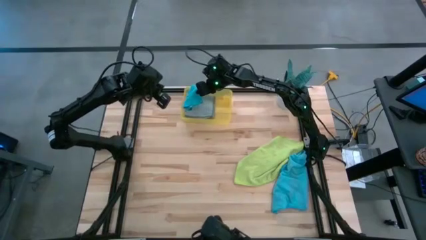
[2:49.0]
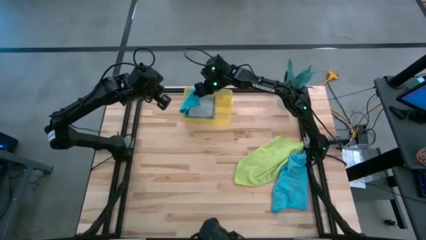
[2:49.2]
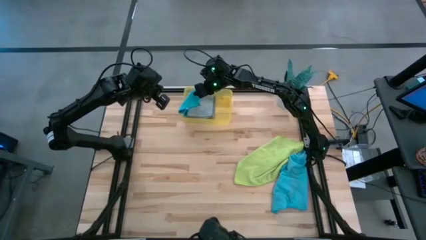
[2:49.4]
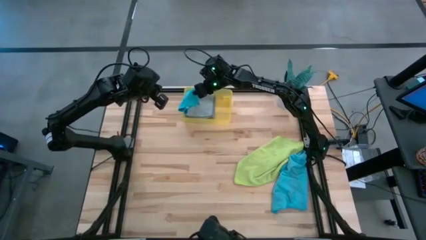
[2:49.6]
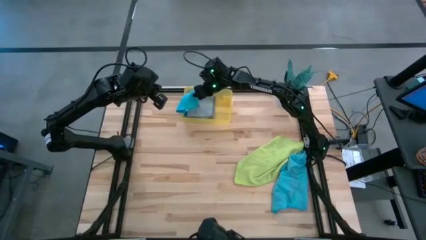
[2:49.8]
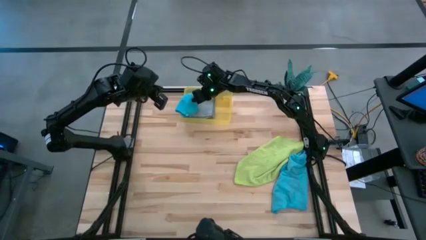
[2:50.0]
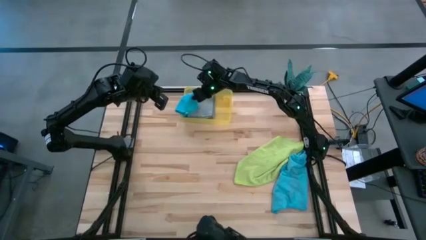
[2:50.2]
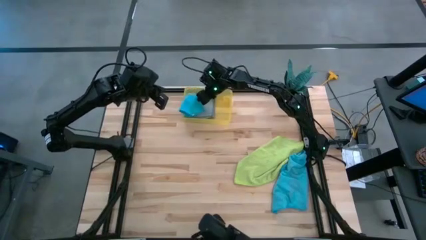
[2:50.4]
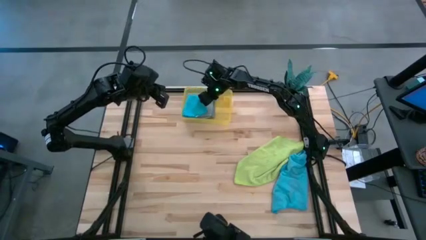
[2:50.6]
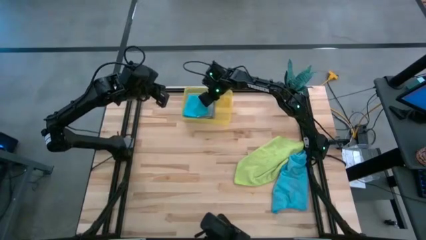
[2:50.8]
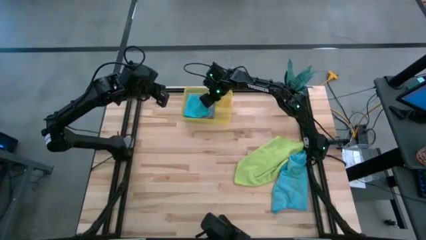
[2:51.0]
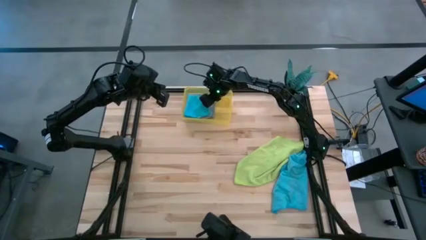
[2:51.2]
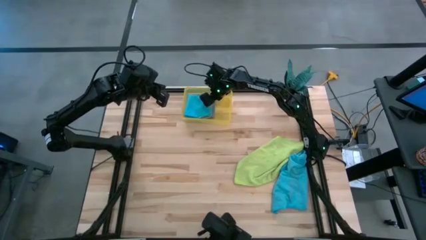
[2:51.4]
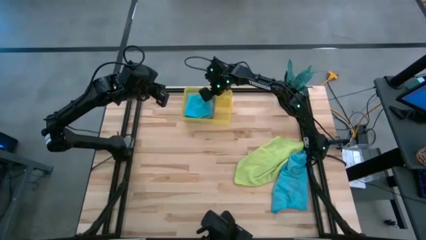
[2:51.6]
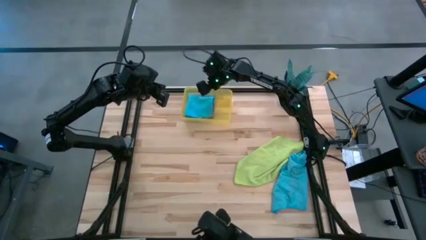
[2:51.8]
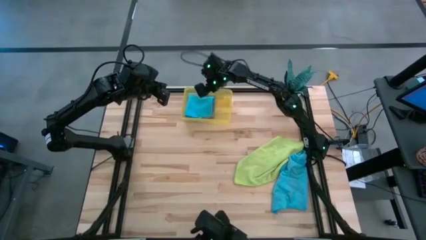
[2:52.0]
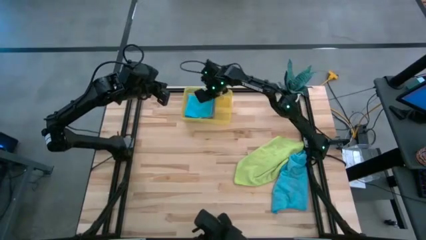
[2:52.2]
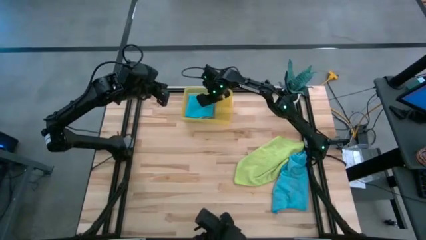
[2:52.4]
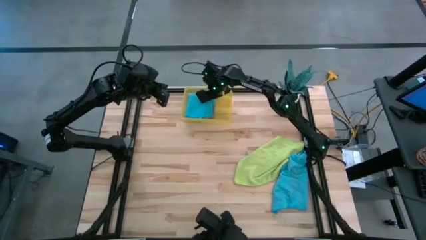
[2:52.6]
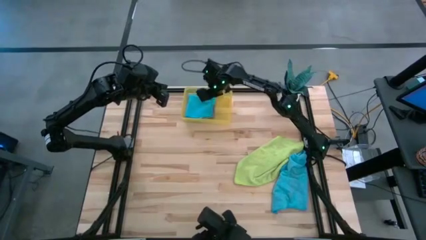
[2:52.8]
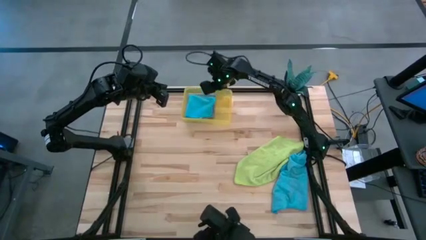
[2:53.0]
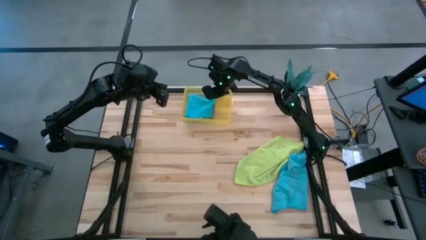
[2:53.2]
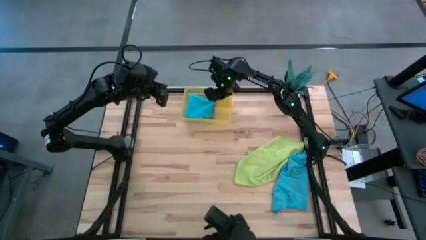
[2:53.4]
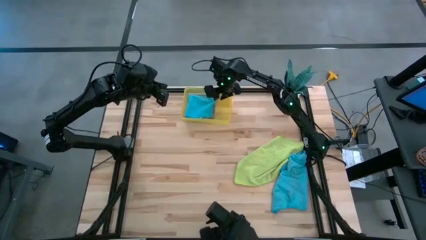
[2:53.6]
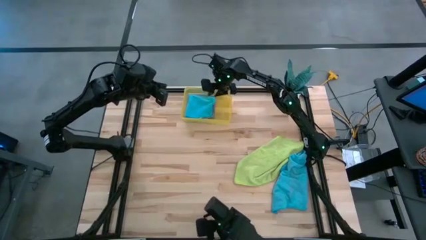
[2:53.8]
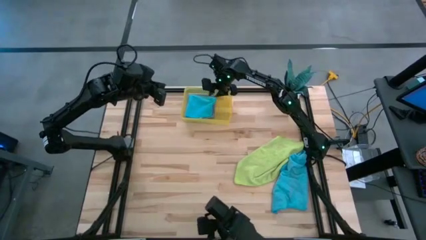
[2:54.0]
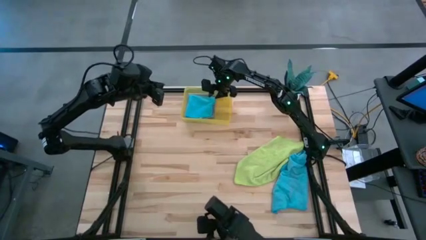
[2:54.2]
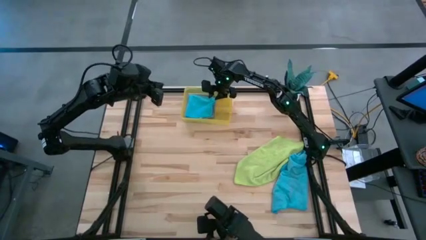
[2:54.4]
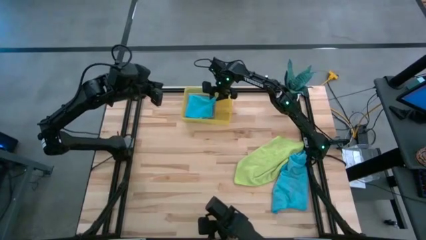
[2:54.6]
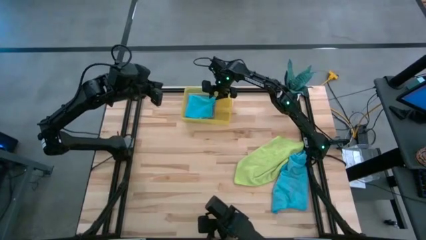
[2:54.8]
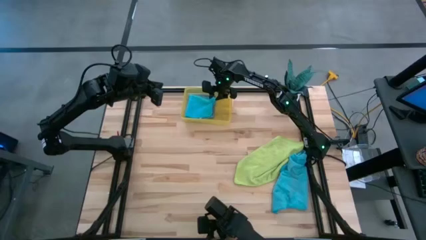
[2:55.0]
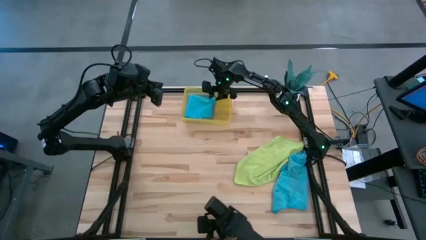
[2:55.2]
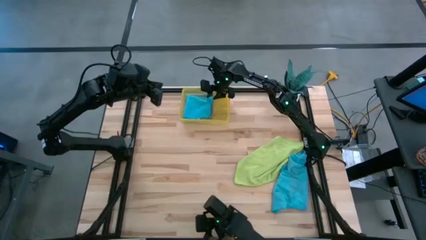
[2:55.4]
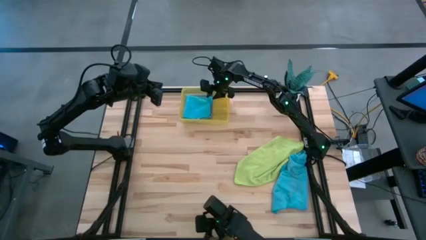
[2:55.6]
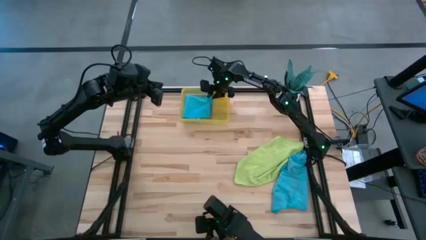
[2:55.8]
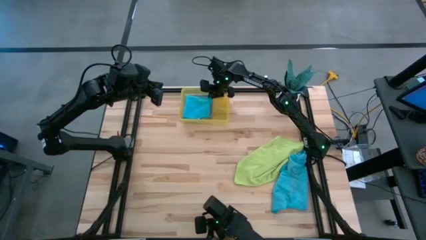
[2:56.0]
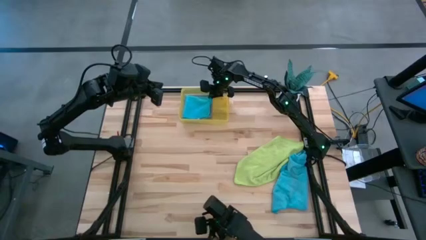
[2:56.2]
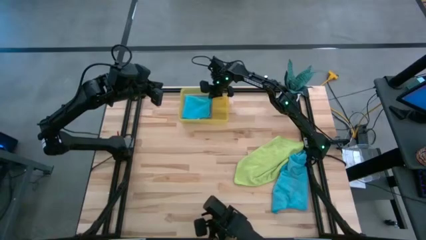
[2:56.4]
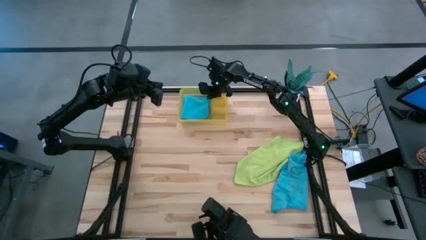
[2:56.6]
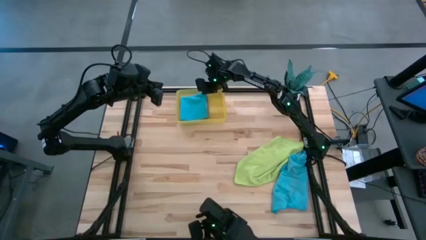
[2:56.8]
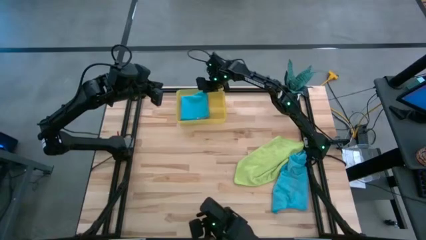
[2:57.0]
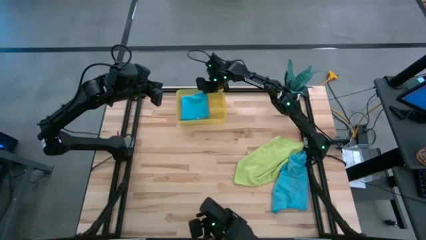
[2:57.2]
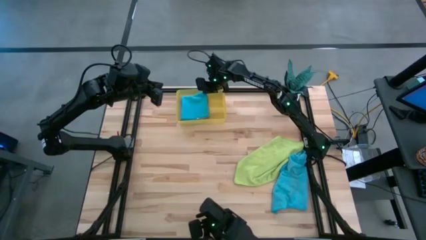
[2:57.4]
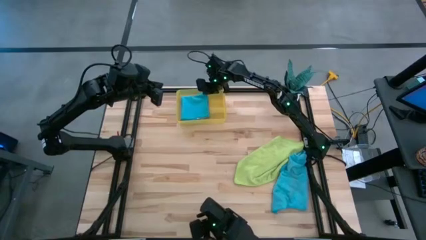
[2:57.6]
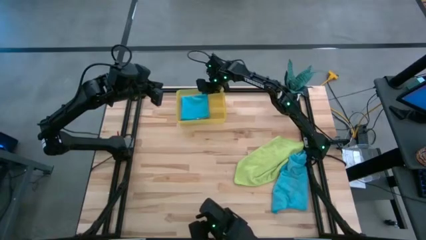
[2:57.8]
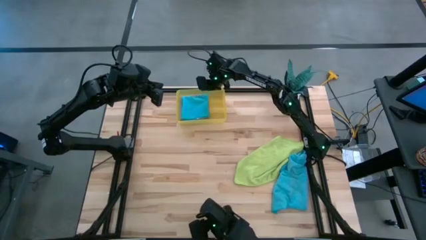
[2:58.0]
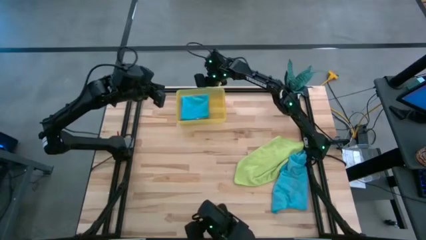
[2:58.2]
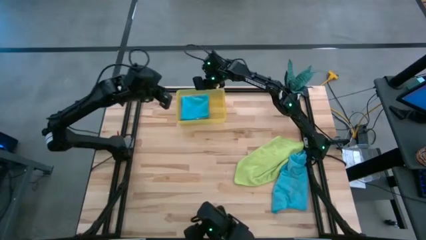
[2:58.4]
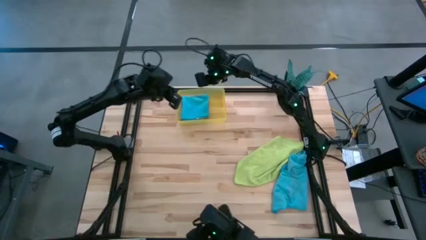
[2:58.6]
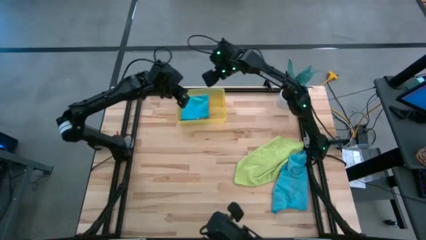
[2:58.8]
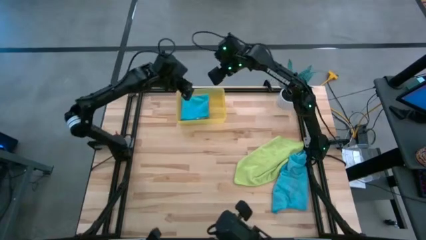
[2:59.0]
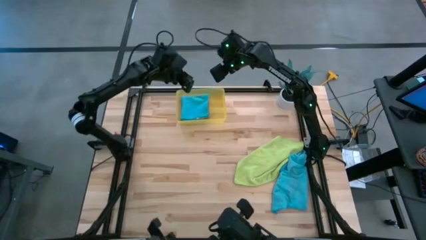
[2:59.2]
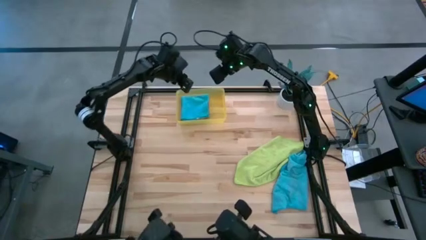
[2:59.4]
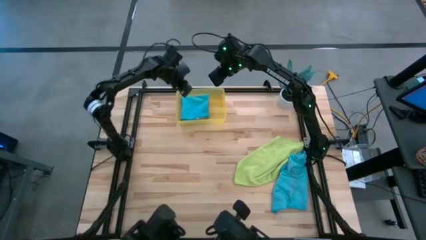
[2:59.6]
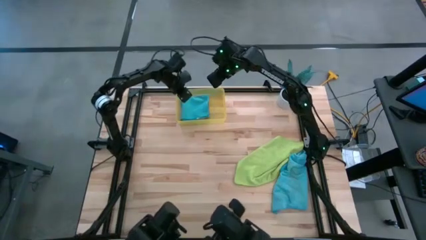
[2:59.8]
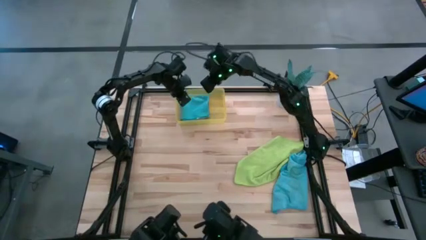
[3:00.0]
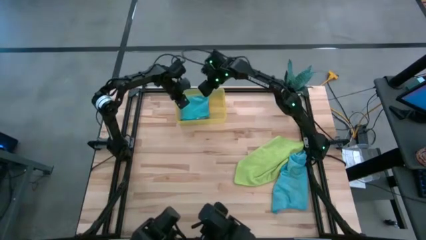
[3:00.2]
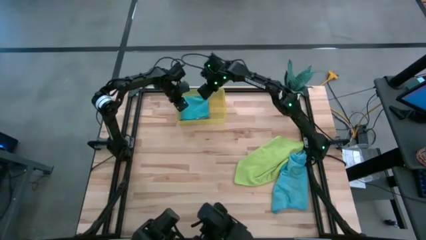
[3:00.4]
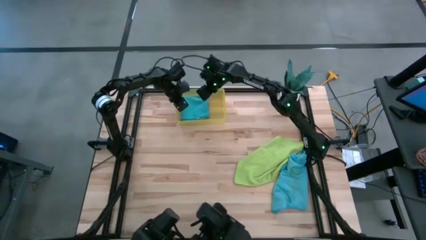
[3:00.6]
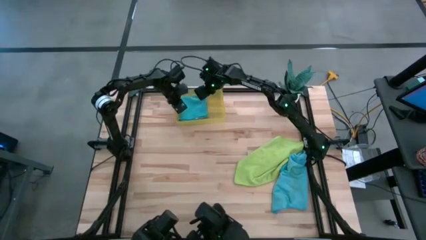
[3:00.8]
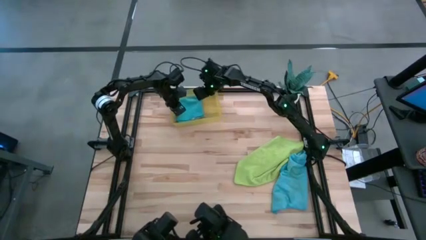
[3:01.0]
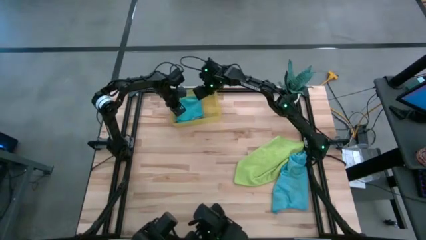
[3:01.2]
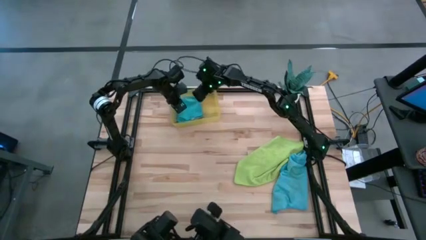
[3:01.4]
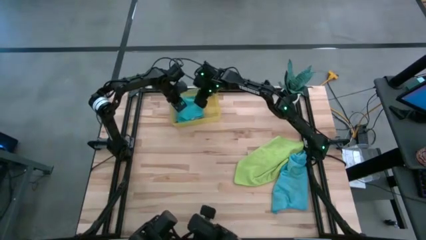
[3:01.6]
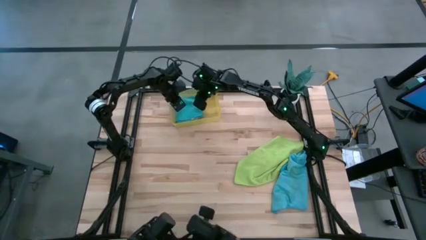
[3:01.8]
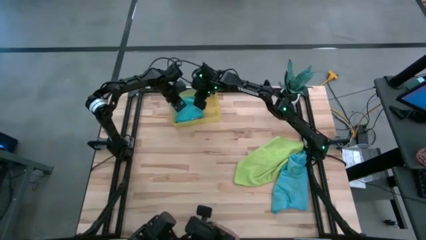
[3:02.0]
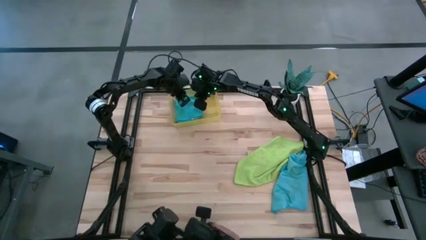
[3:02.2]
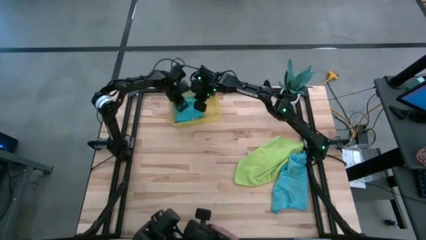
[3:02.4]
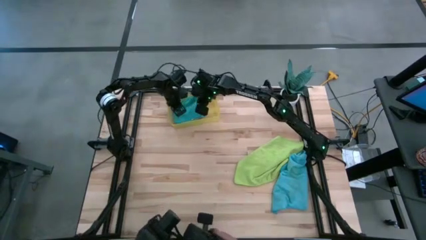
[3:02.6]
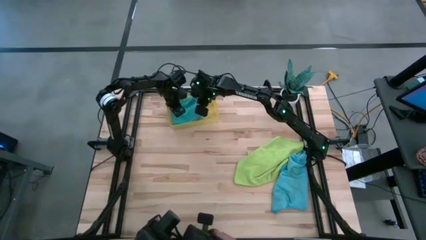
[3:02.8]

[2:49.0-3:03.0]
Task: Fold microfiber towels
Stack the blue microfiber cloth on the gray microfiber cloth in the bin

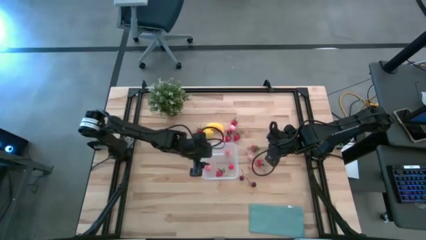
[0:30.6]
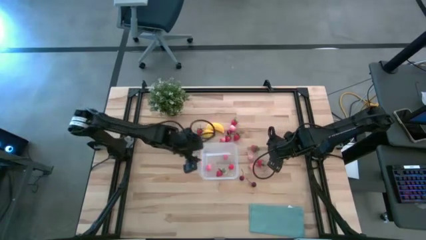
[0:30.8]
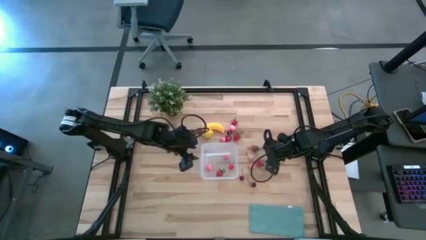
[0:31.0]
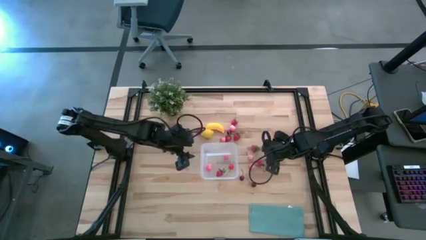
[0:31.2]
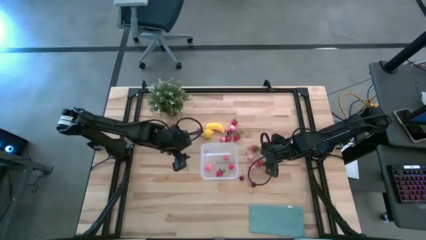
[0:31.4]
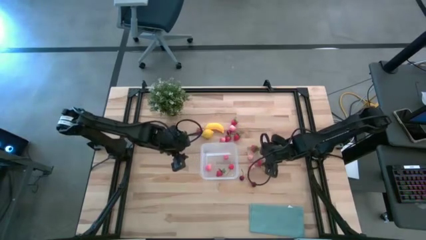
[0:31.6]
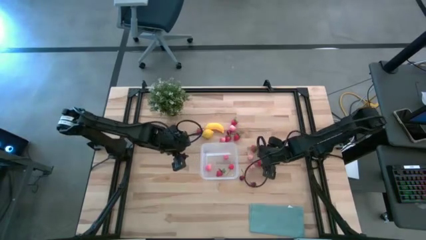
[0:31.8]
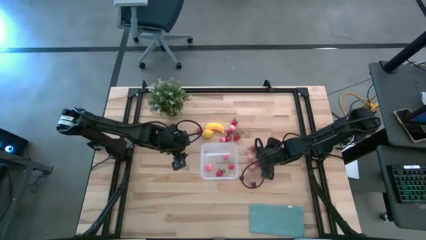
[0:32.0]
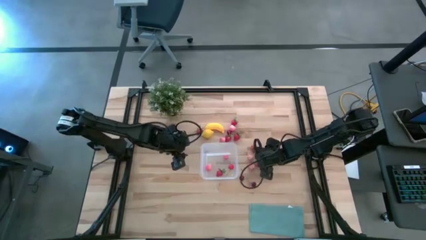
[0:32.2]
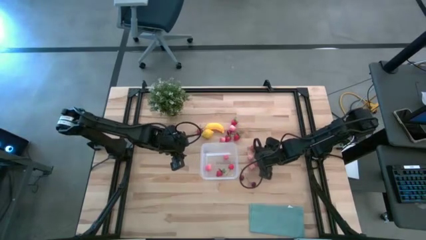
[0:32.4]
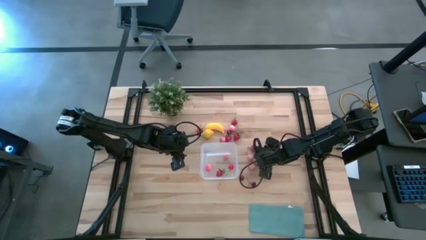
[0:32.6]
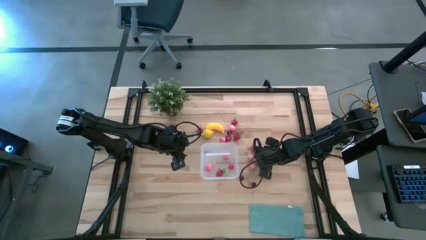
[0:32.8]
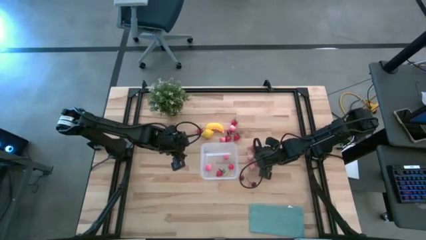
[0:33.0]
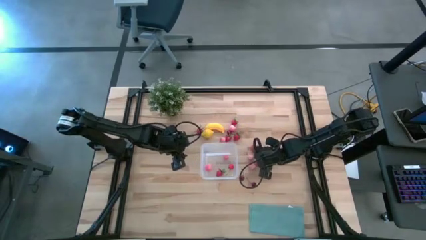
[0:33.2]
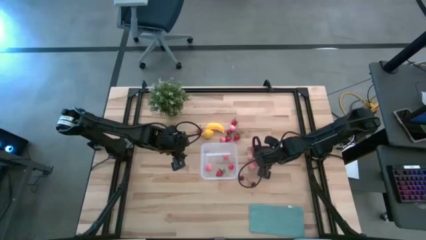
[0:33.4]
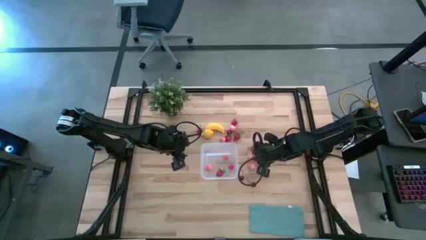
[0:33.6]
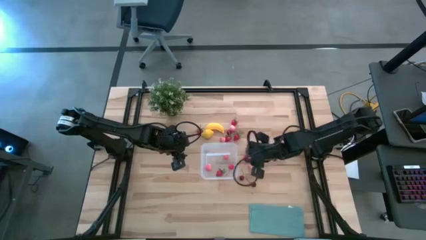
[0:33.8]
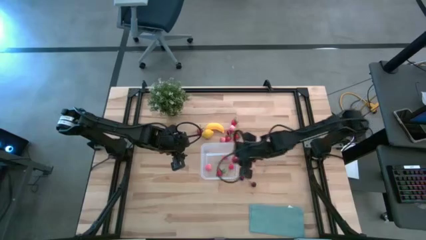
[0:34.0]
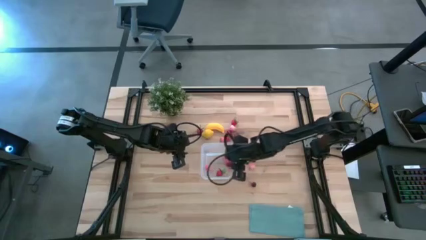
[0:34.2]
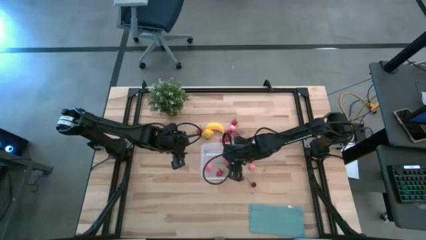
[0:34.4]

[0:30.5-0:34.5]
Task: Pick and placing Produce into tupperware
Put the red strawberry into the transparent container
